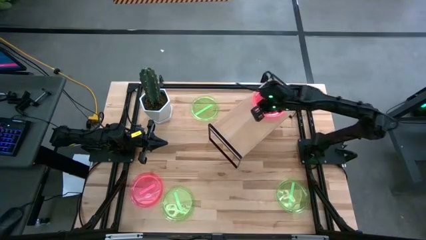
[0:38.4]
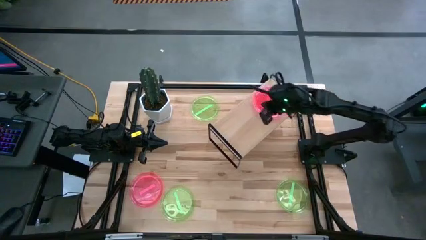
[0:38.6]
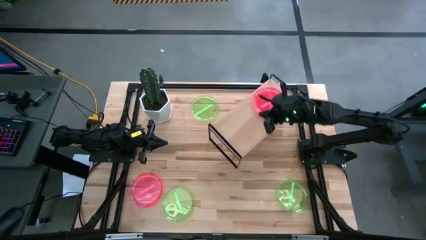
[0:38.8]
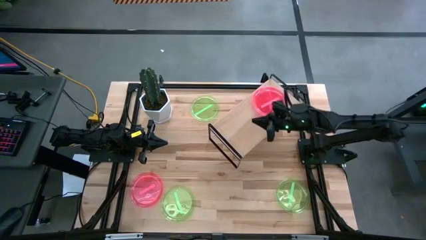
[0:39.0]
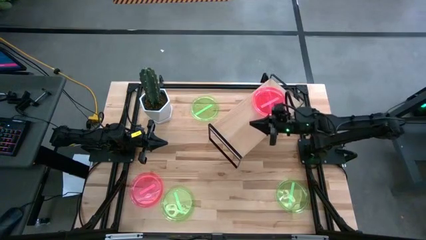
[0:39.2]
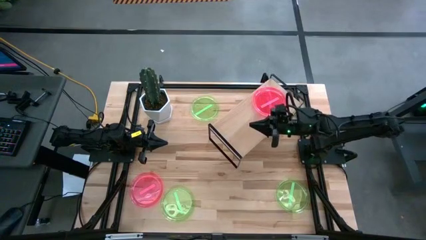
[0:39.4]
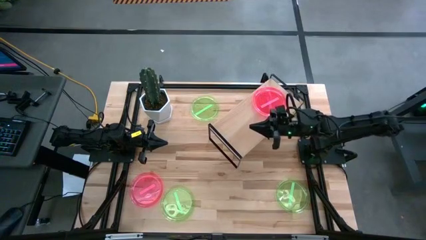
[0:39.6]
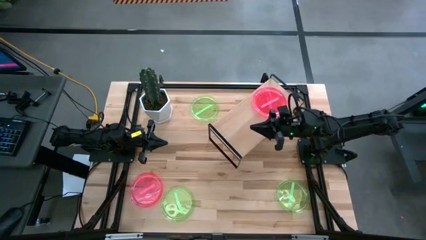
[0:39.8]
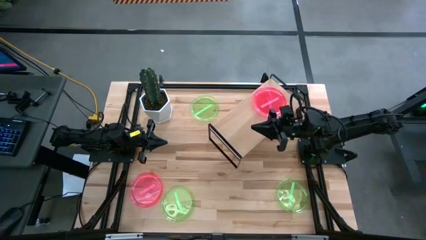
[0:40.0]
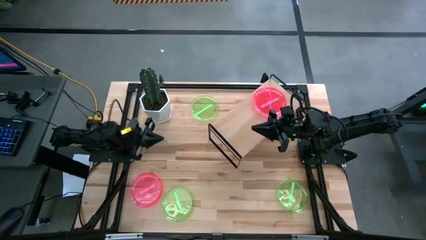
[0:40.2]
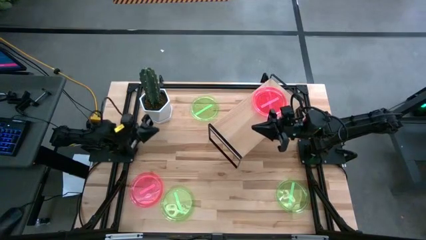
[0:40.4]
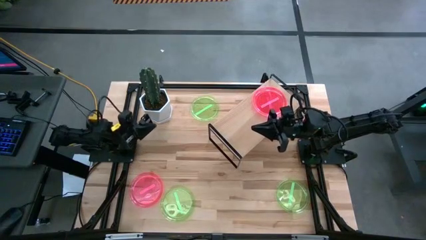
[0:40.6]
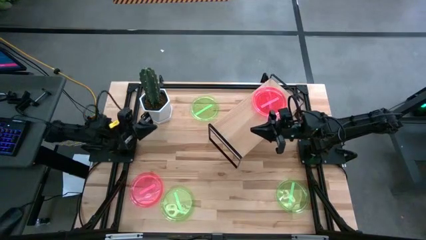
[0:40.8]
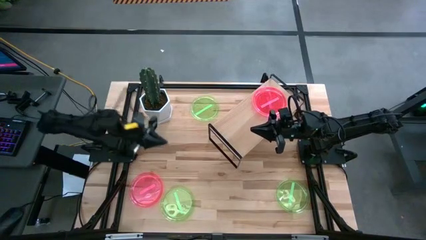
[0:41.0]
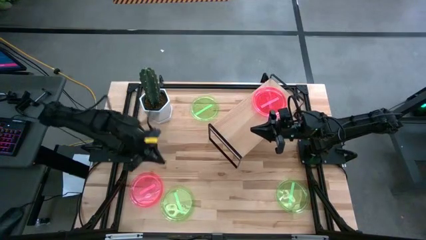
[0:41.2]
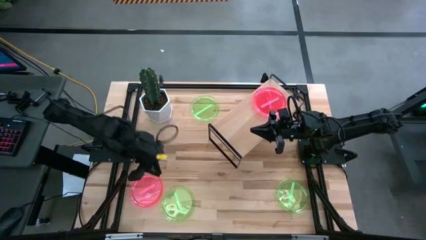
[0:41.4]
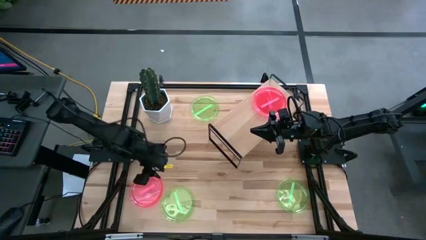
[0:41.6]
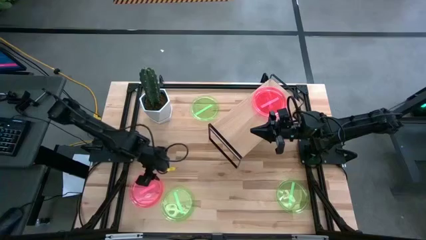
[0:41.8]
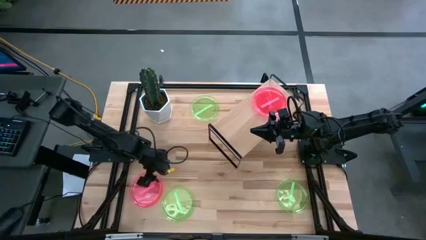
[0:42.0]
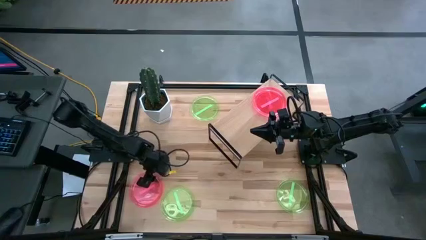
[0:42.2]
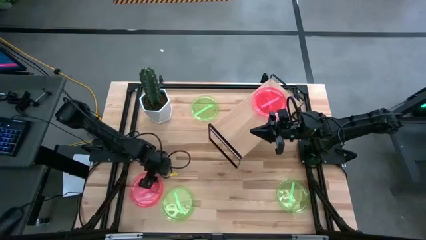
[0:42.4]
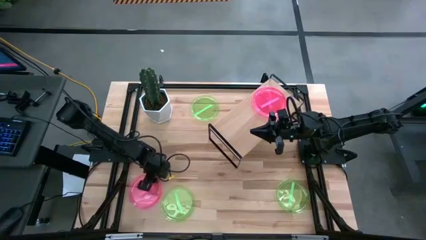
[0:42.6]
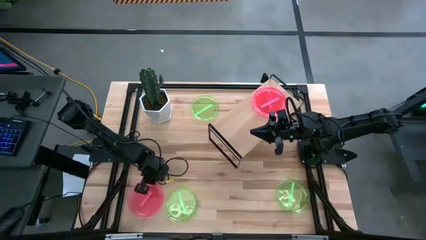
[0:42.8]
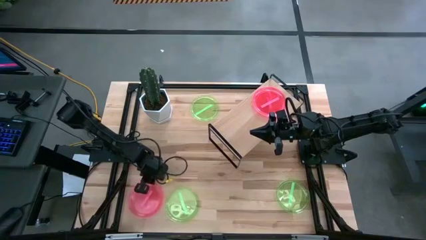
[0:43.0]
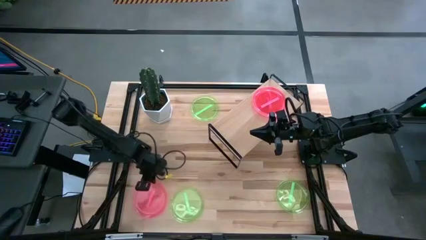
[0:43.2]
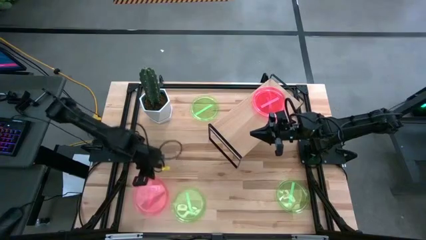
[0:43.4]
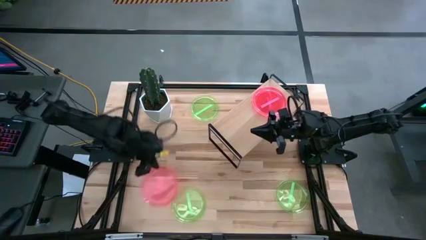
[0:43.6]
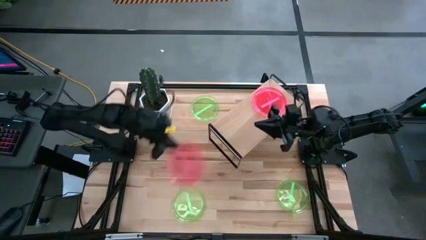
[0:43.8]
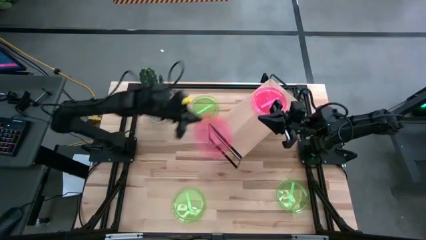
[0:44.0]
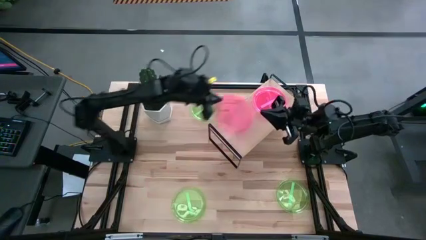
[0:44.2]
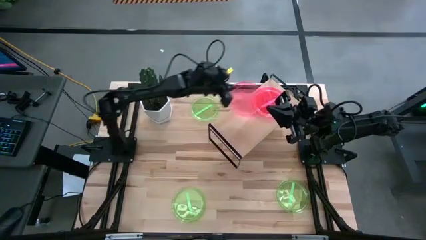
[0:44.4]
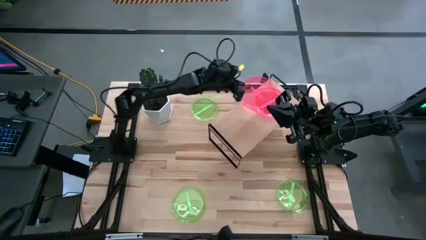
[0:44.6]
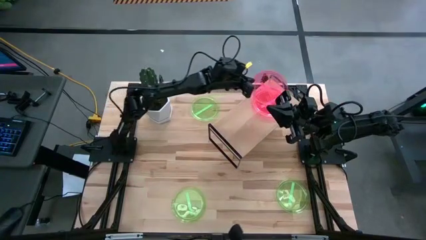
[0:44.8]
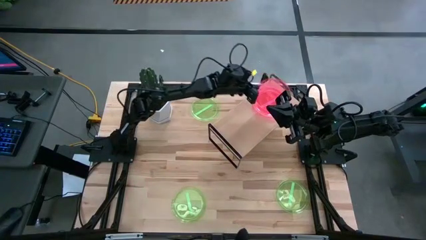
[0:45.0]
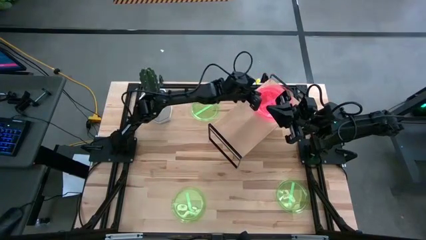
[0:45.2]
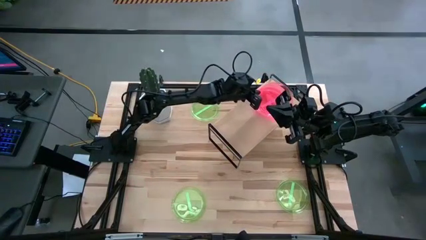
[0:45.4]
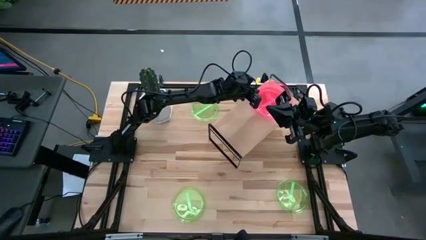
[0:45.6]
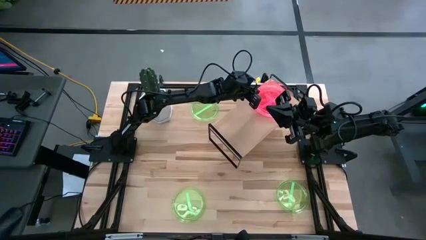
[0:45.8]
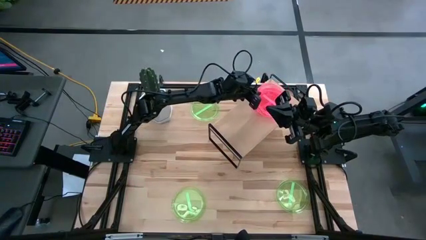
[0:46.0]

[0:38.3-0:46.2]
Task: Place and stack plates onto a shelf
Stack the pink plate on the top of the pink plates

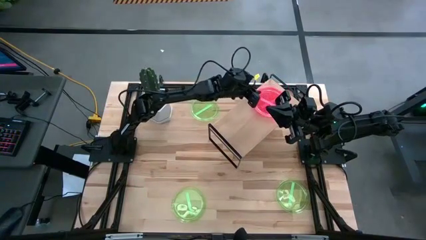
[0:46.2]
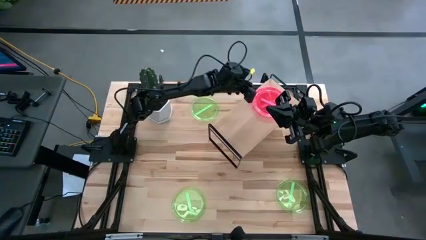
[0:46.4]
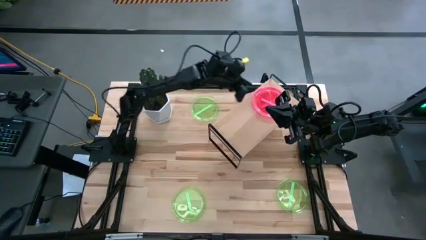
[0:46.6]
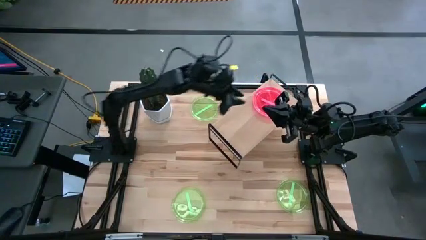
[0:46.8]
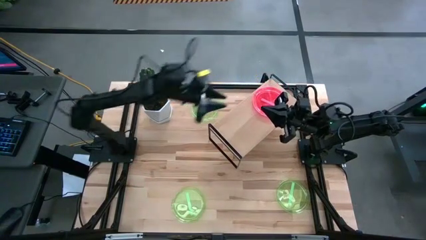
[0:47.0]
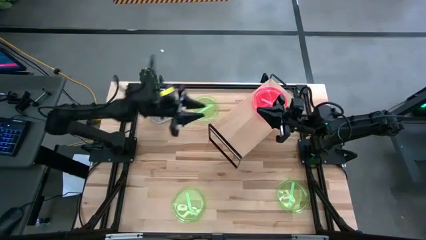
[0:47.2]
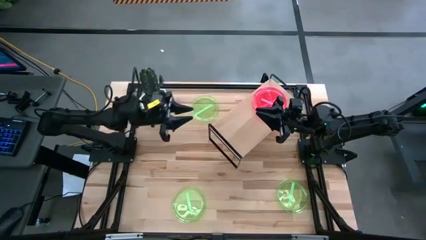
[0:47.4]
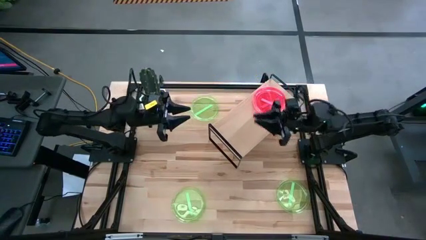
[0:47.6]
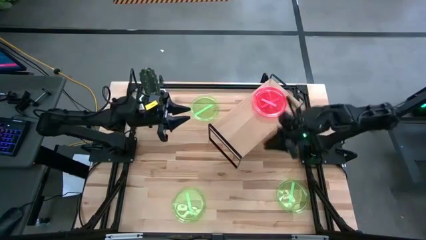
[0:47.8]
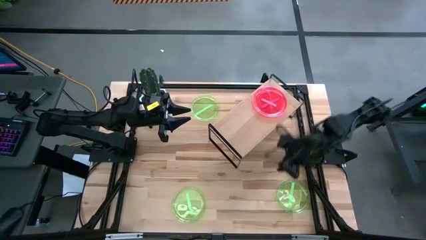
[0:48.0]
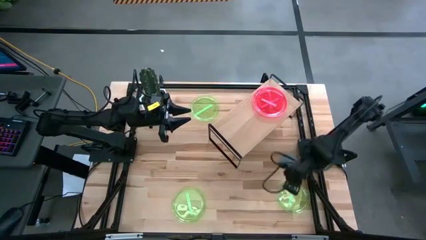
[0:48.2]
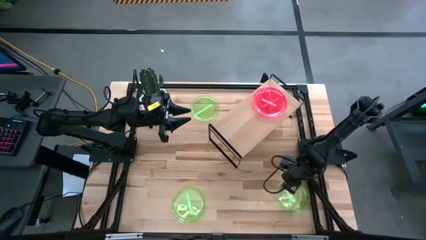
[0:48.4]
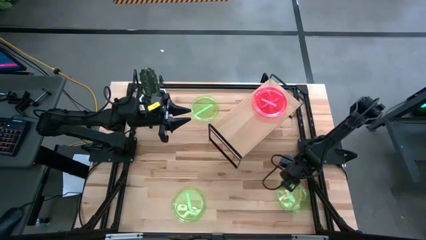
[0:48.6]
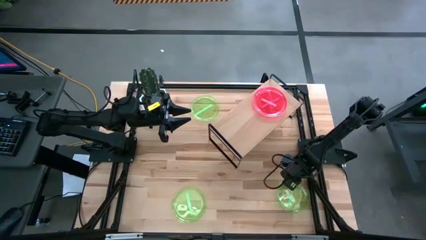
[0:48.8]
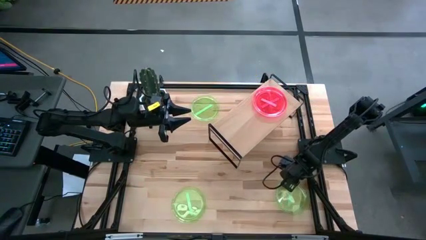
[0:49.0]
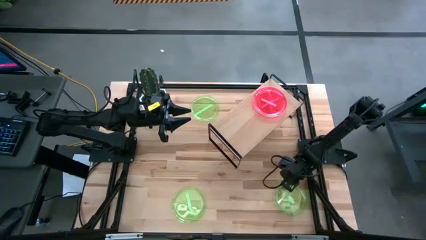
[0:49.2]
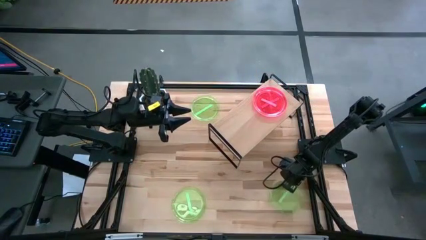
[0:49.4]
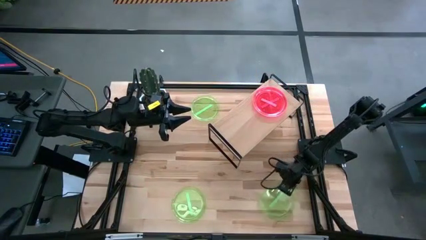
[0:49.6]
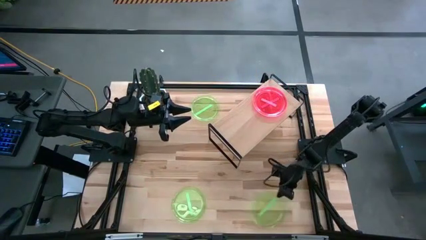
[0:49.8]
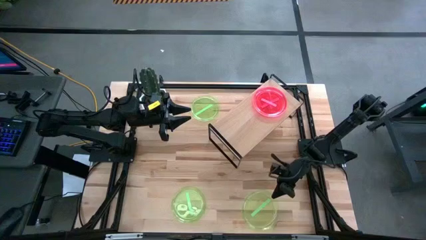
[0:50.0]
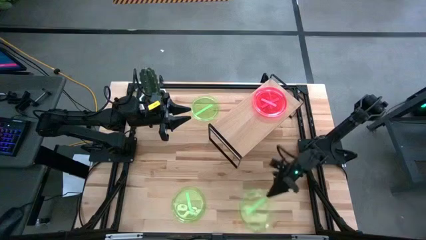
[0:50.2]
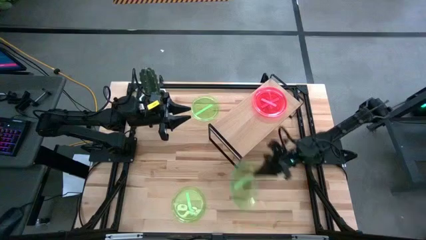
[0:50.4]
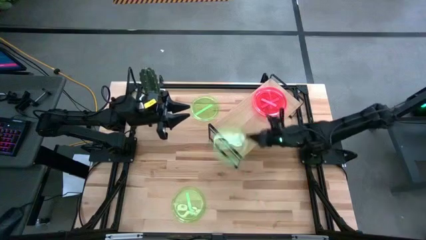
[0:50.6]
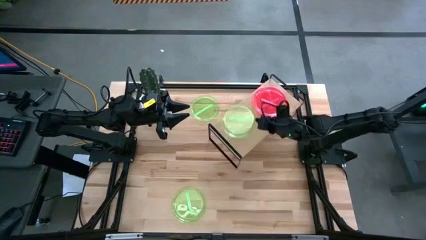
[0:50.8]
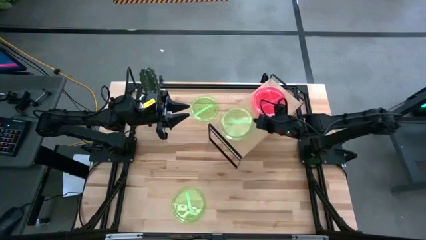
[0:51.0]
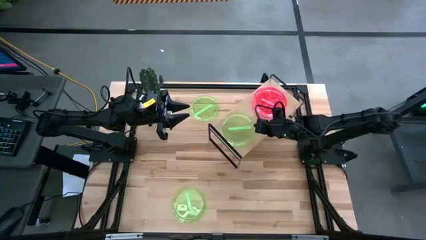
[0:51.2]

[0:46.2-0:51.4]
Put the bottom right green plate on the shelf

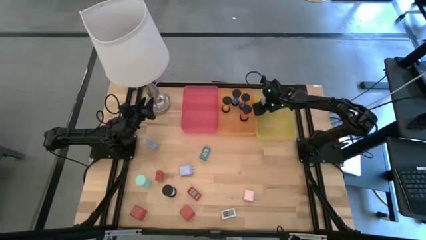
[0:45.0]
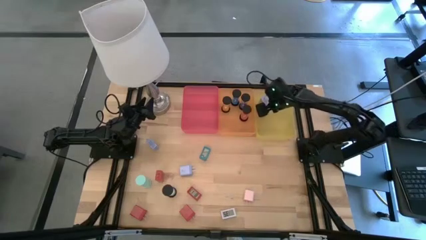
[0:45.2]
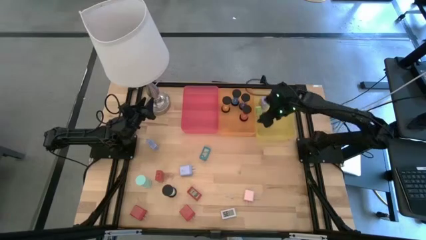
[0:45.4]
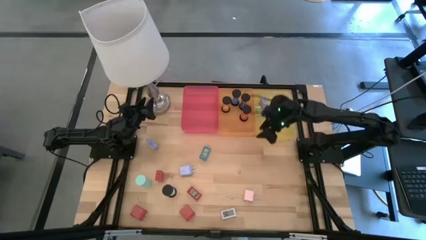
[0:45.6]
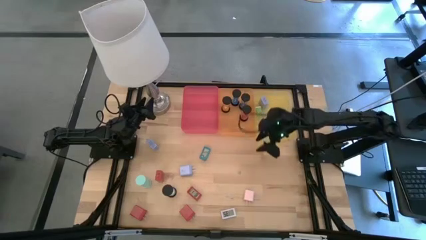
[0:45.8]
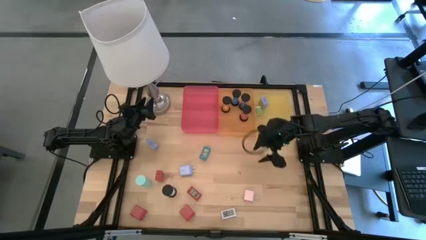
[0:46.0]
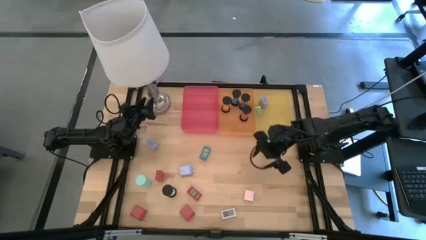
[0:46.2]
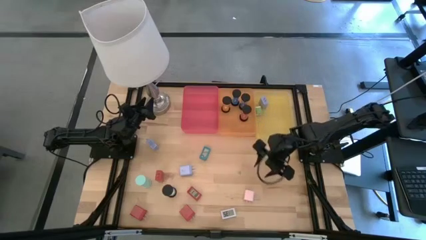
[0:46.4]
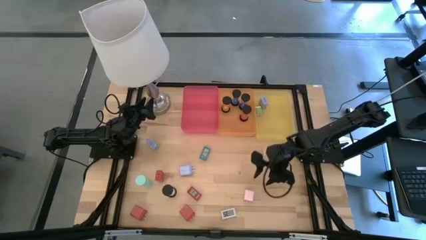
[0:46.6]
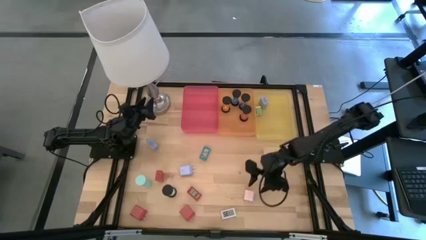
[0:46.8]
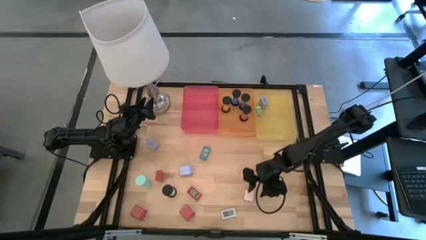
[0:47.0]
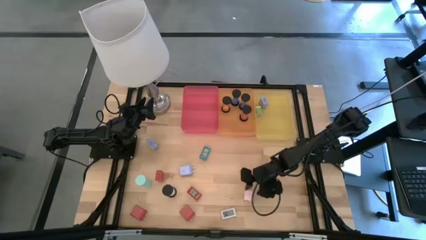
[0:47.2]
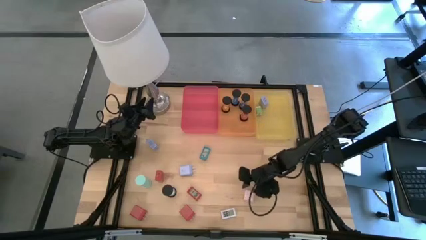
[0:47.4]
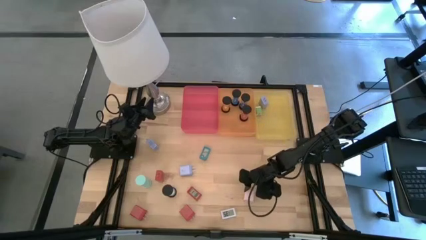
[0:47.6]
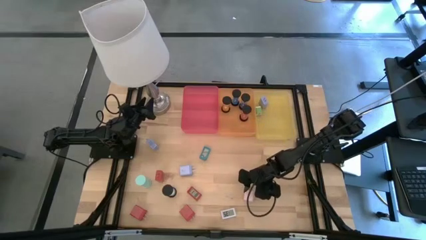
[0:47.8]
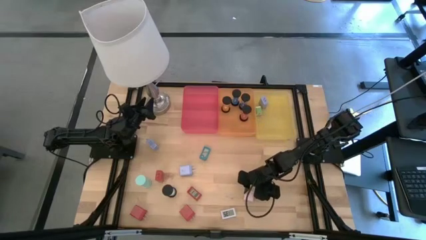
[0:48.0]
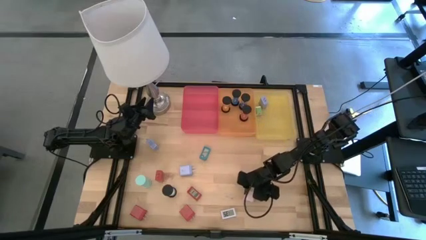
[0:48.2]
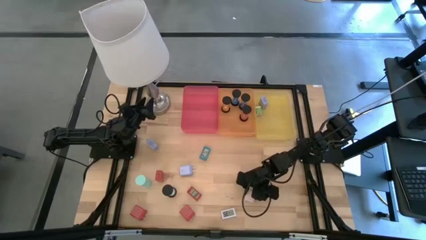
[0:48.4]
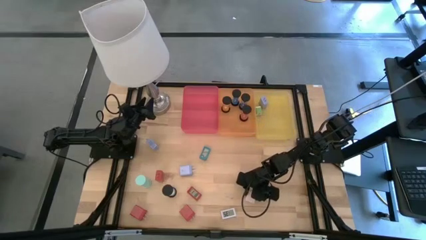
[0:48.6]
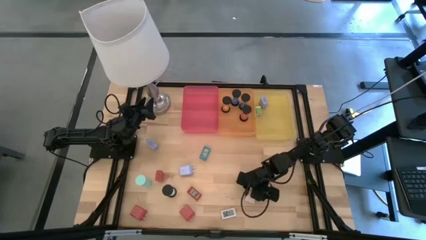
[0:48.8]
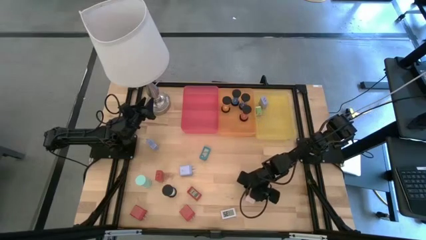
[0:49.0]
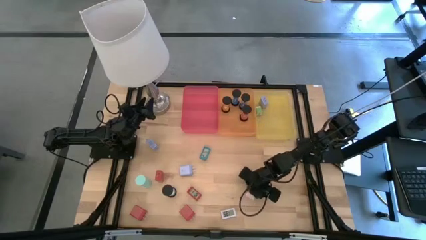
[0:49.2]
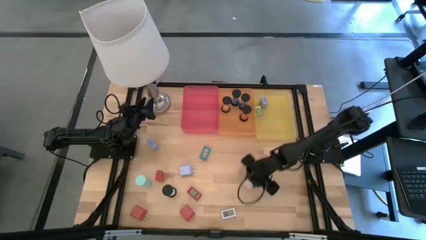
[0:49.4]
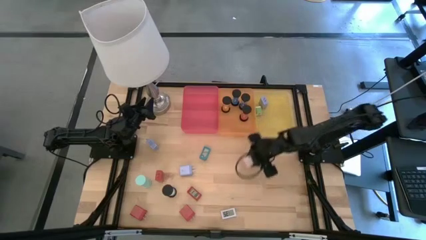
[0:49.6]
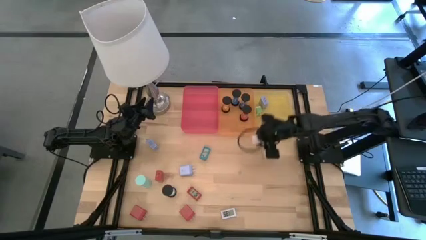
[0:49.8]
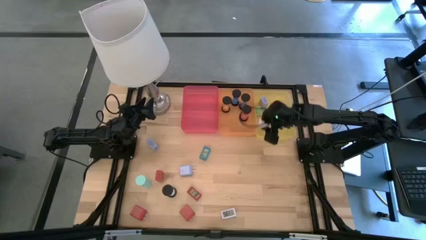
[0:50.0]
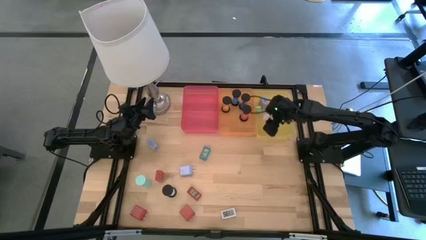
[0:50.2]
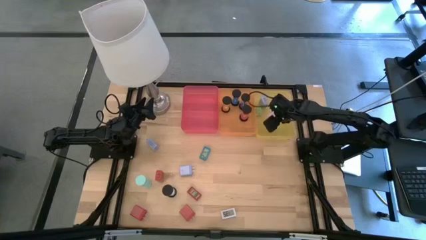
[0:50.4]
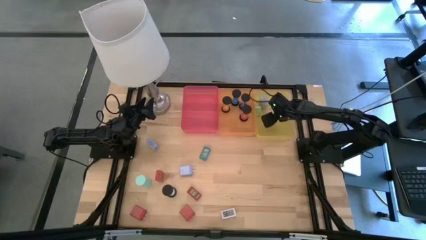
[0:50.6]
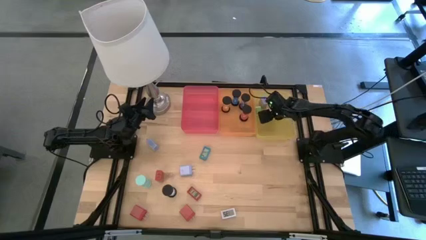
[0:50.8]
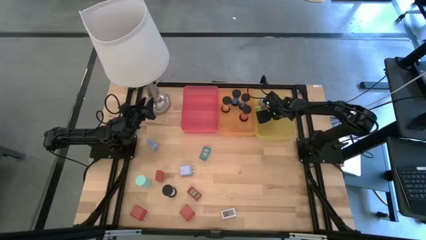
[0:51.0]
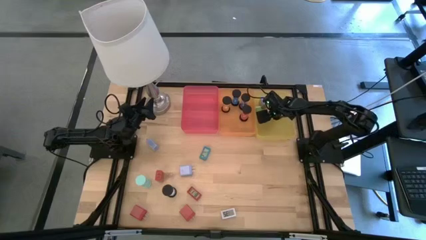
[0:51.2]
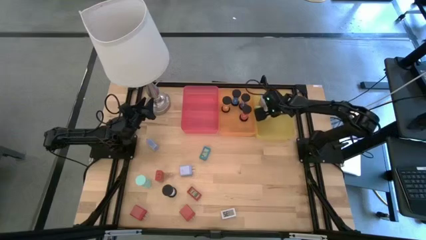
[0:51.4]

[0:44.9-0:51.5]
Task: Pick & Place Office items
Put the pink charger adapter into the yellow bin
